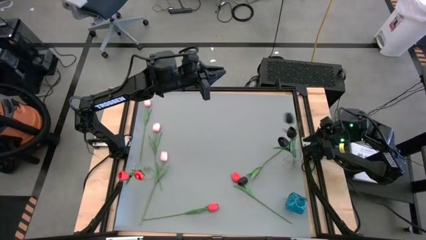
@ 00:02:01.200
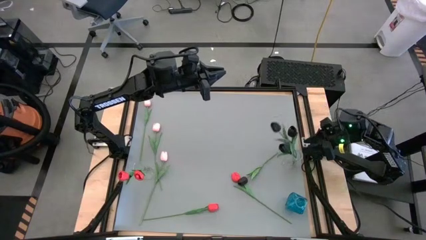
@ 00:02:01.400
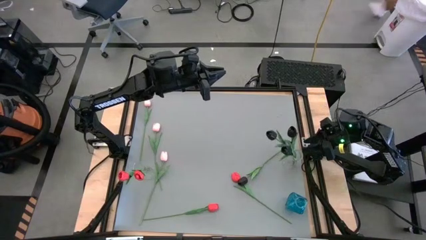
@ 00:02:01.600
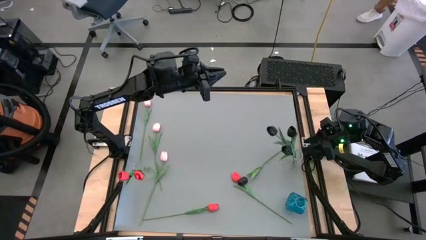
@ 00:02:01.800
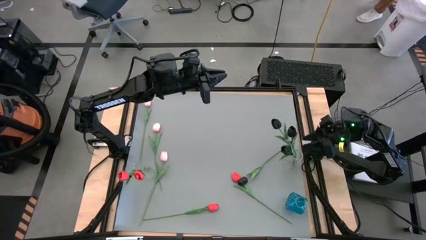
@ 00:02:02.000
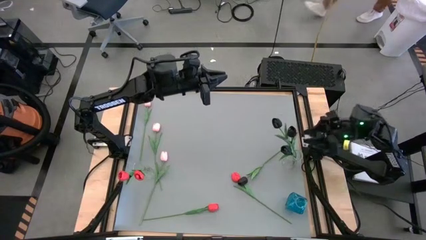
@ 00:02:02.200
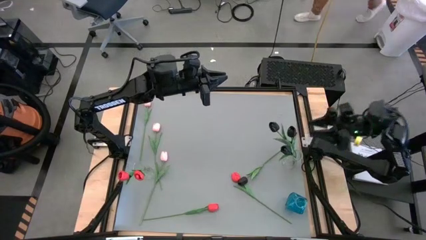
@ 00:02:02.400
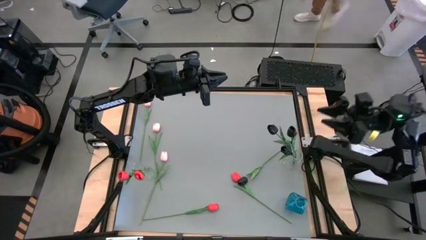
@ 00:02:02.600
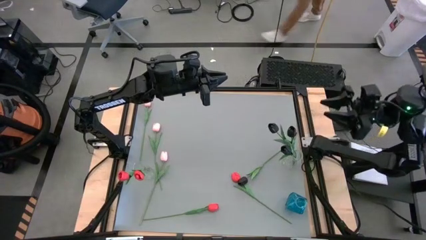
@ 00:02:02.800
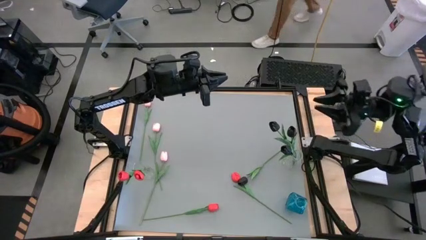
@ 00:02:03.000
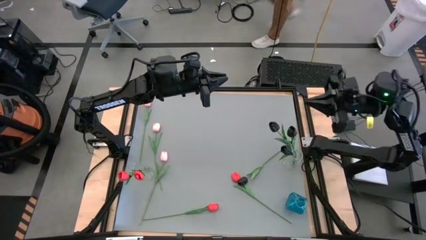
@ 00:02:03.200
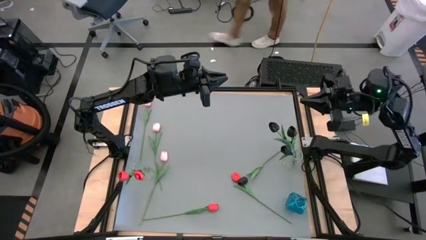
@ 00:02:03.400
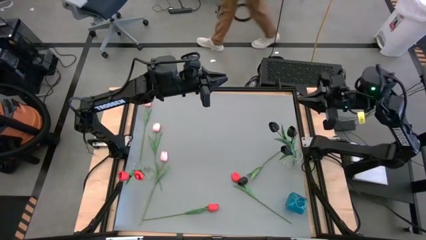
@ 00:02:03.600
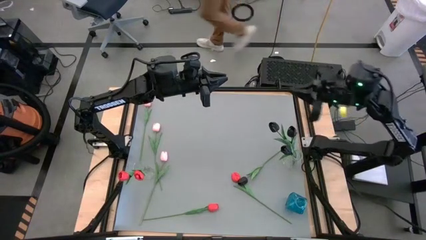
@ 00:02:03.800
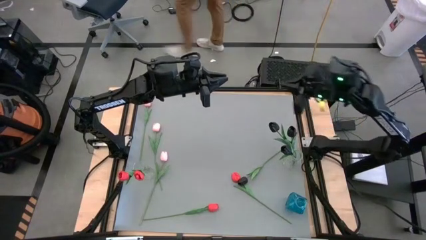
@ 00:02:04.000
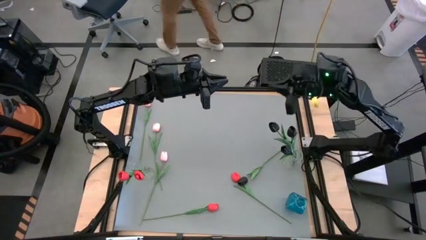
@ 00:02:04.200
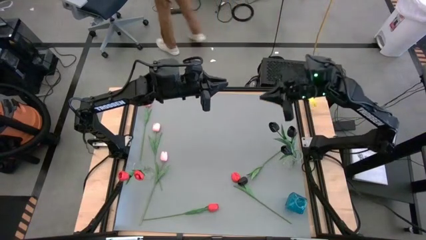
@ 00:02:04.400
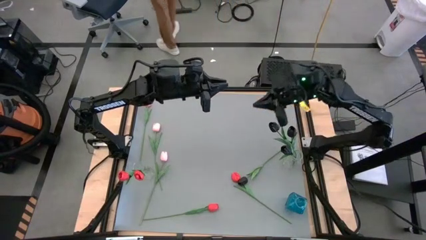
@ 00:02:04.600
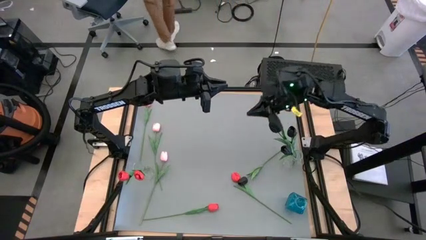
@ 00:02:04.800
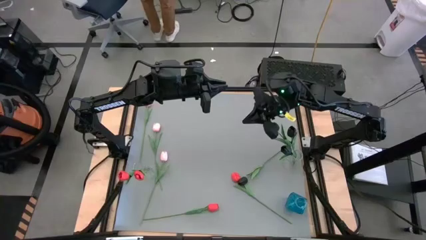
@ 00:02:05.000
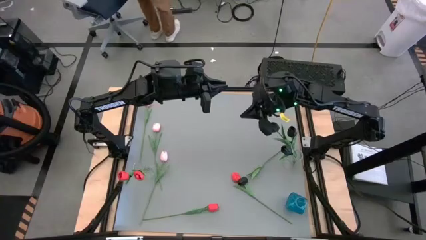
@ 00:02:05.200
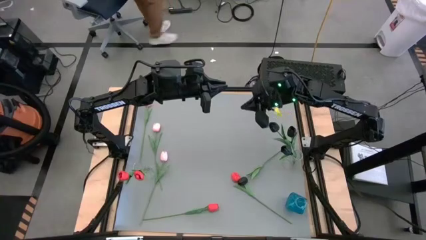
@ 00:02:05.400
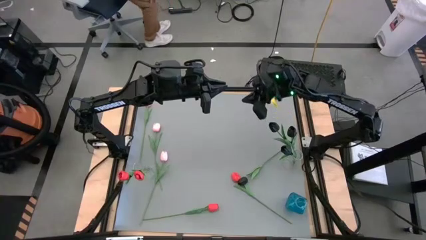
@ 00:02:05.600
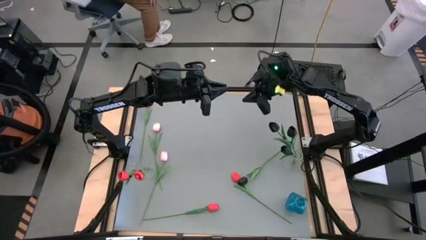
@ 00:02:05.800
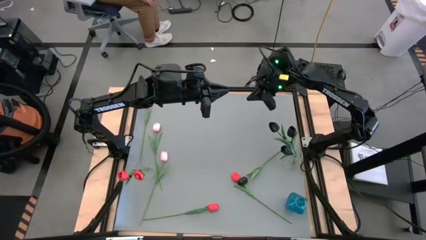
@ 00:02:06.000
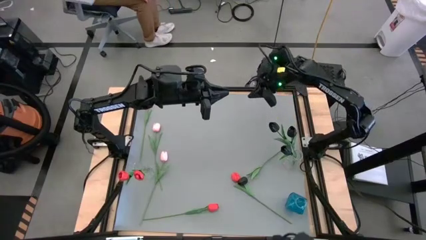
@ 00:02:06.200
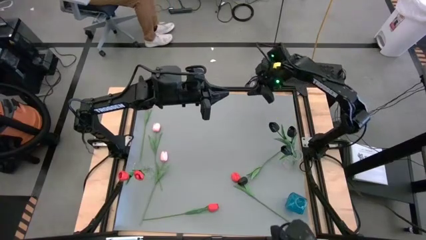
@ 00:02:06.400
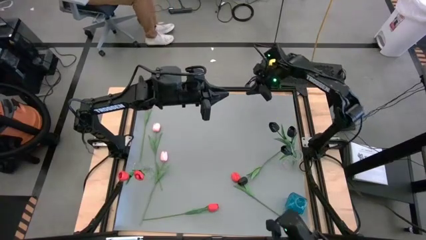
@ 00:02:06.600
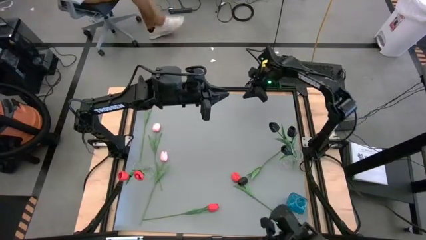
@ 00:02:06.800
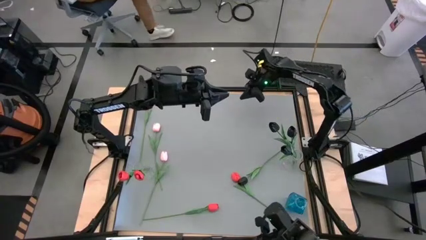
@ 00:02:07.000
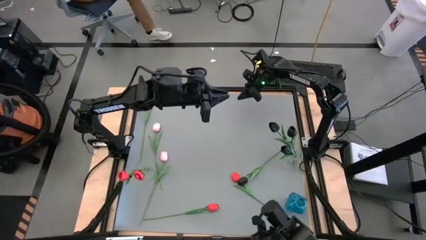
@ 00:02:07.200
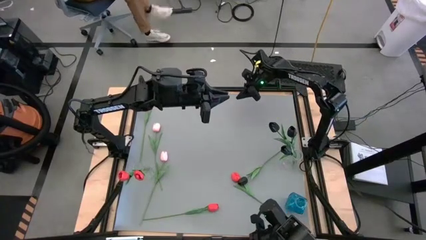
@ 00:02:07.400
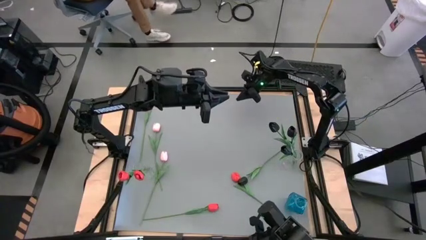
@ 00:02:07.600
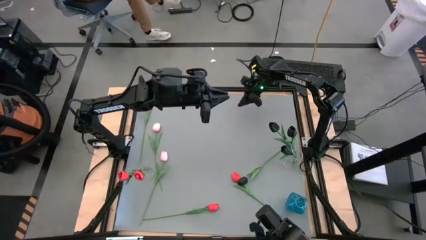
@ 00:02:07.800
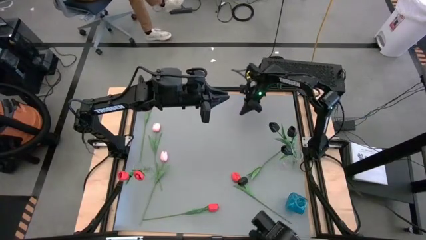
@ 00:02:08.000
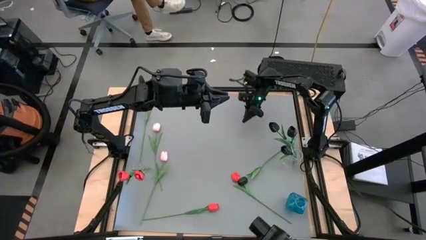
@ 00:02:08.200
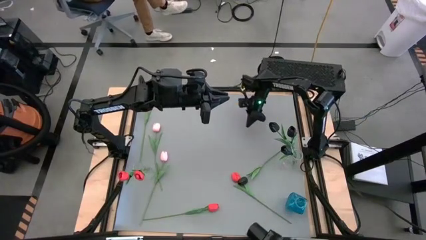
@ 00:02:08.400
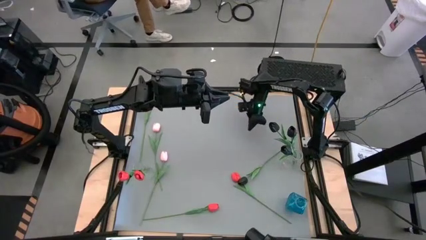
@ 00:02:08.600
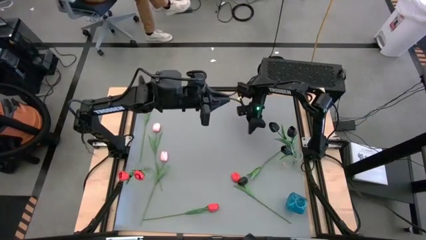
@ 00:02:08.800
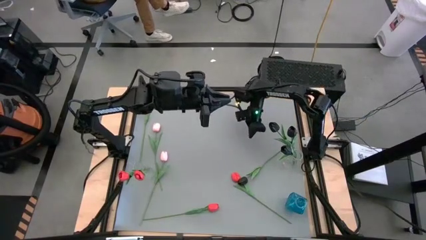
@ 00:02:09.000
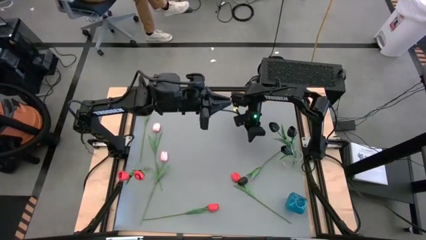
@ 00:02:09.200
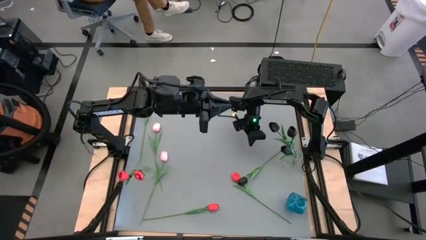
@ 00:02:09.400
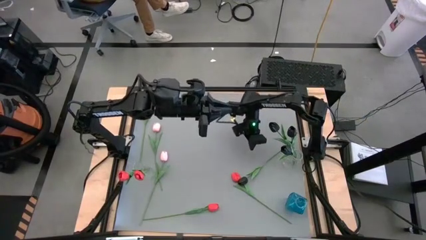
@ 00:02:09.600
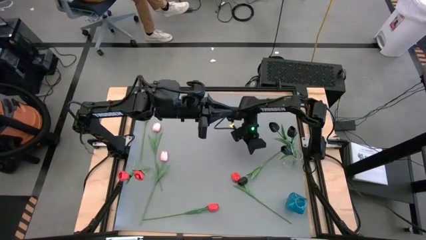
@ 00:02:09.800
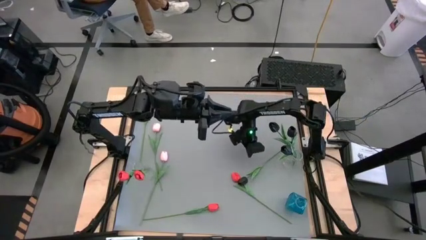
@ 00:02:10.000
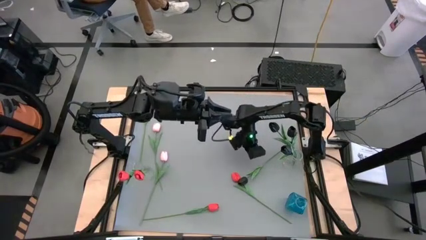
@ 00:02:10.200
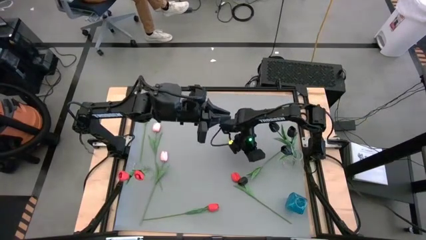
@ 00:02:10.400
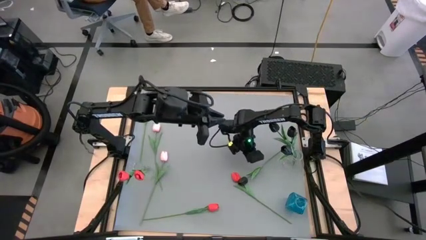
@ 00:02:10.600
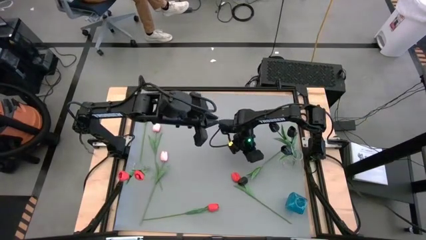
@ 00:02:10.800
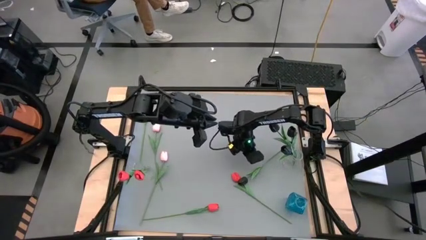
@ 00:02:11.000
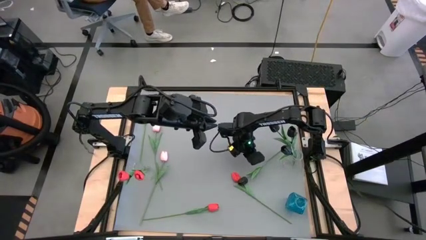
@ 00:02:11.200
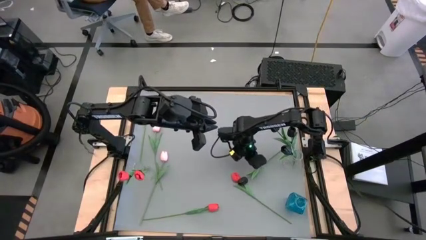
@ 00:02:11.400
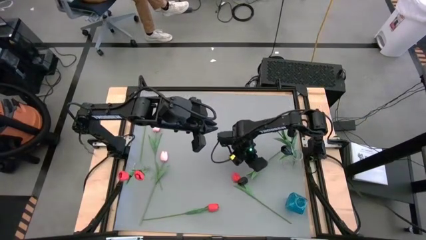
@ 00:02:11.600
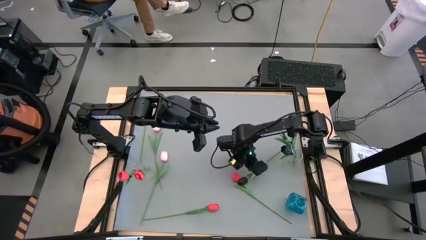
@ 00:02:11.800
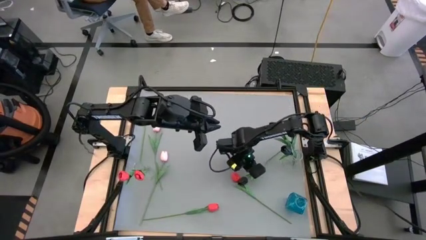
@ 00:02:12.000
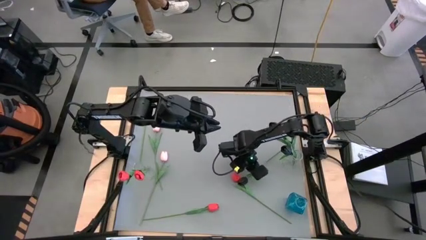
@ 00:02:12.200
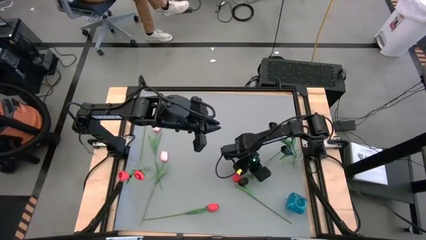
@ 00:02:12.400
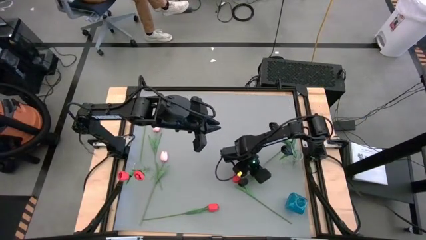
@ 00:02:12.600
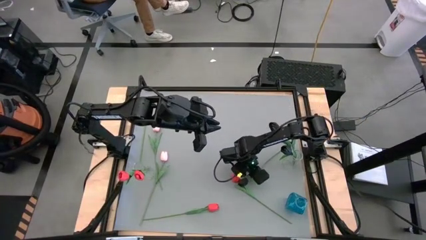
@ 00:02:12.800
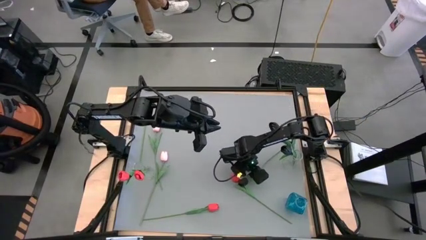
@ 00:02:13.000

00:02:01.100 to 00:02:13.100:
Task: Sort flowers into vase by color
Put the black tulip into the right transparent vase

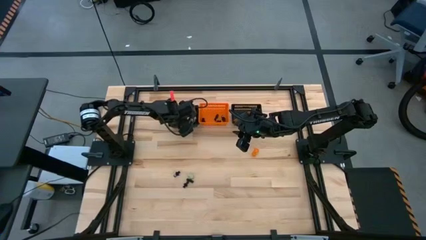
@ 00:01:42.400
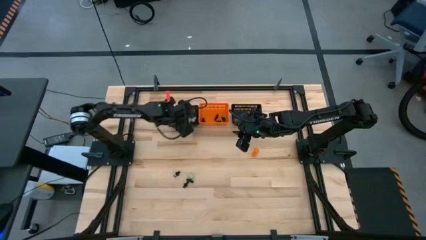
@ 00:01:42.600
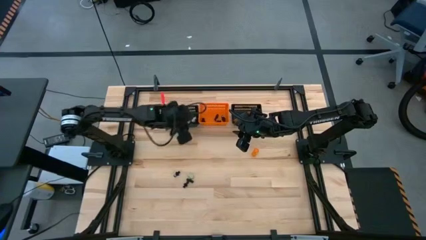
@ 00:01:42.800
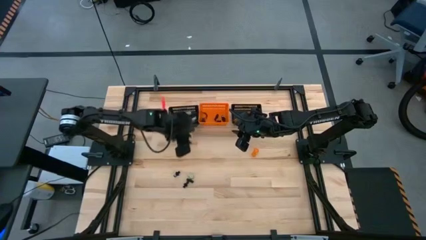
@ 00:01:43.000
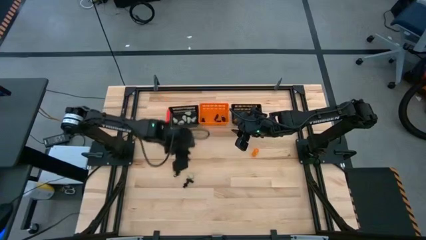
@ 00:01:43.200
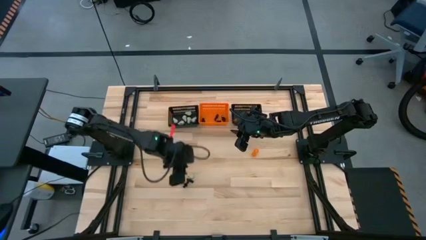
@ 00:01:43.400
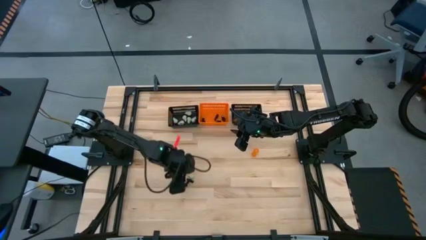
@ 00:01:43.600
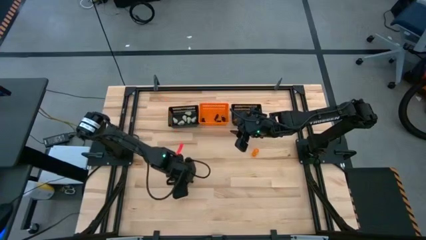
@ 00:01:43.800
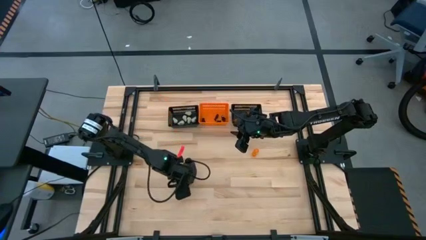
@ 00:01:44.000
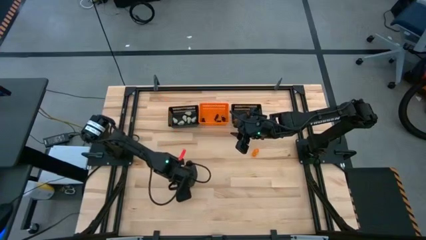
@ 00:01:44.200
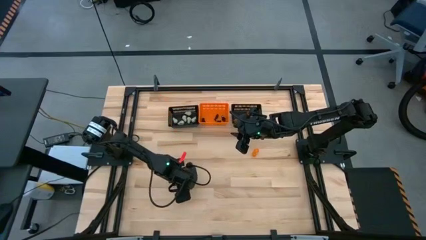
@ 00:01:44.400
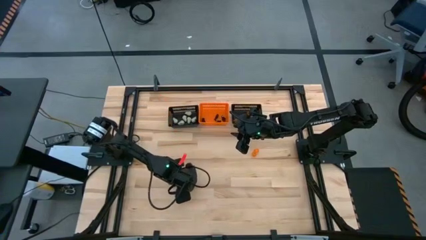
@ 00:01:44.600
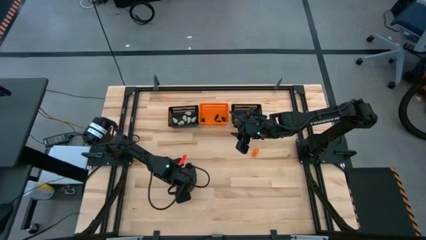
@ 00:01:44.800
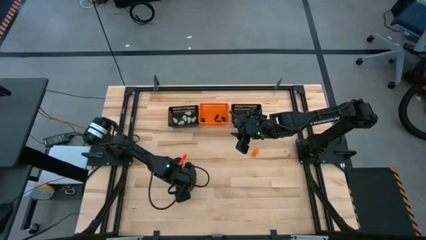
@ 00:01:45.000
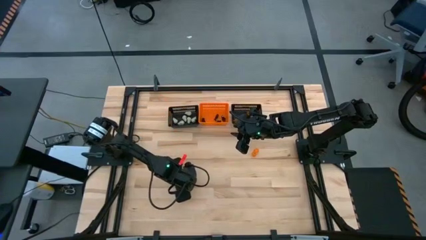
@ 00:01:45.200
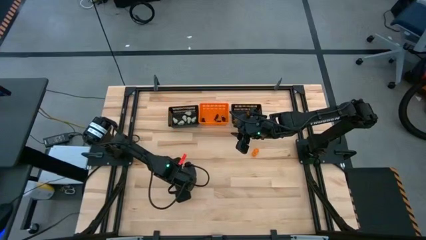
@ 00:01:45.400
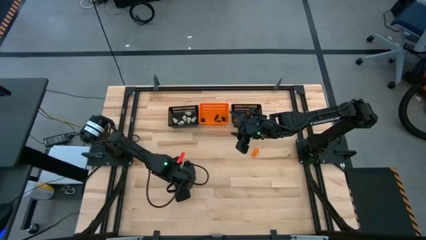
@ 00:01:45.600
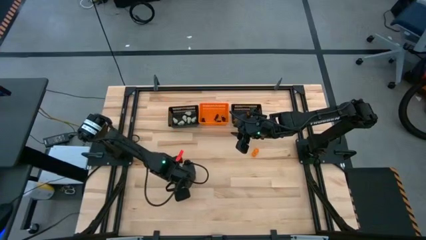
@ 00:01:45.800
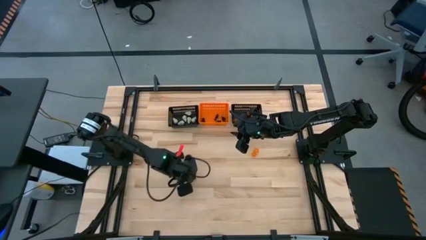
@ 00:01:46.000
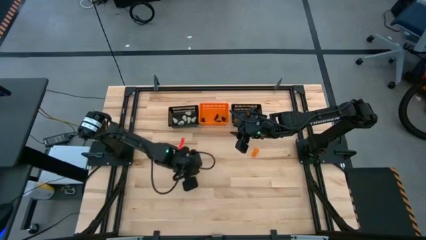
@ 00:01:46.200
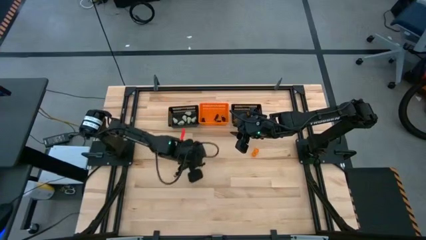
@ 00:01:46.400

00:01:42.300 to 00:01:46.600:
Task: Sort Halloween decoration
Put the black skeleton toy into the orange bin
